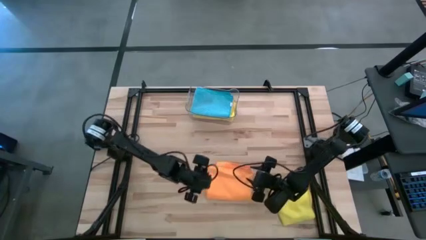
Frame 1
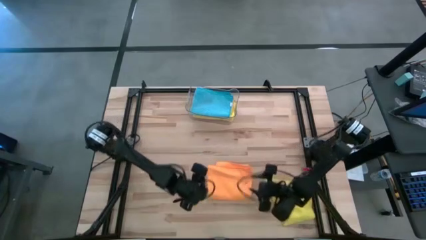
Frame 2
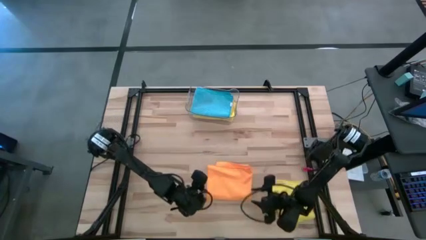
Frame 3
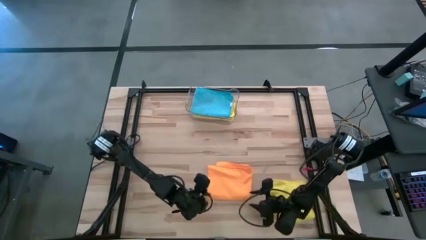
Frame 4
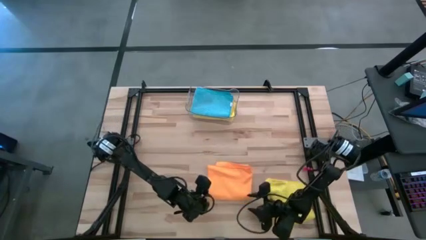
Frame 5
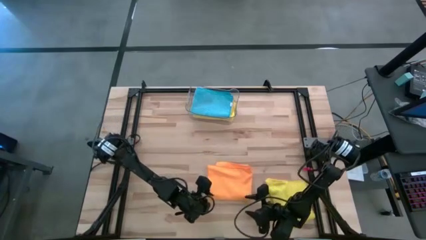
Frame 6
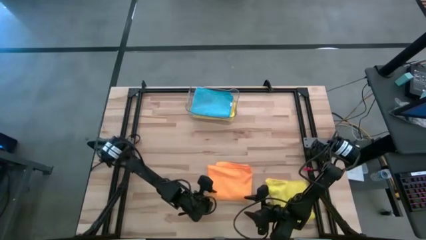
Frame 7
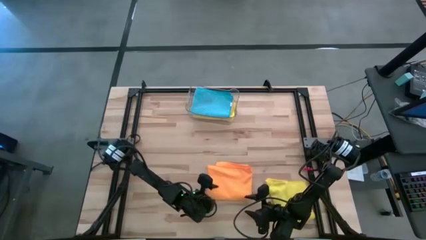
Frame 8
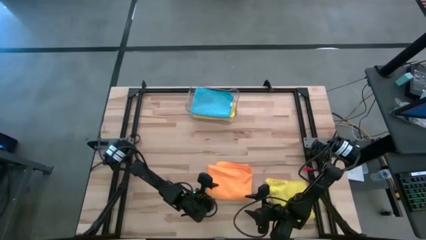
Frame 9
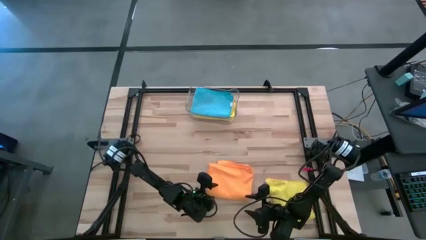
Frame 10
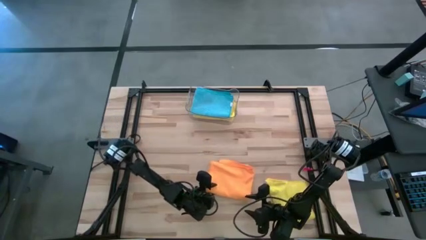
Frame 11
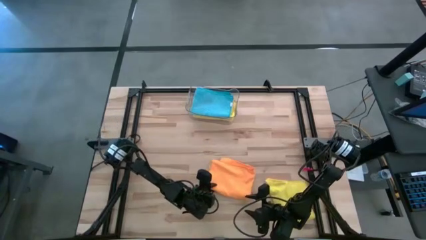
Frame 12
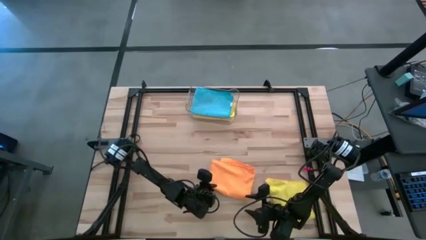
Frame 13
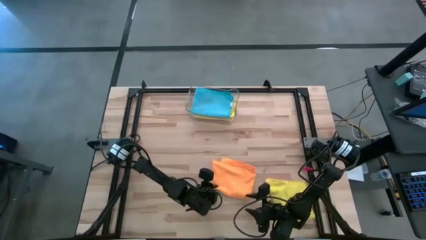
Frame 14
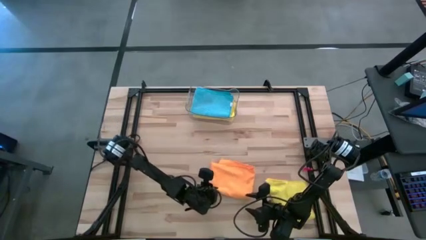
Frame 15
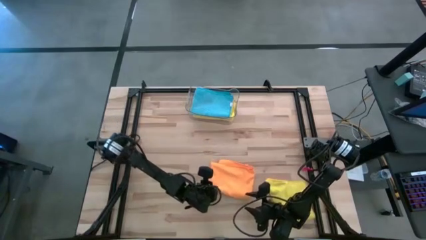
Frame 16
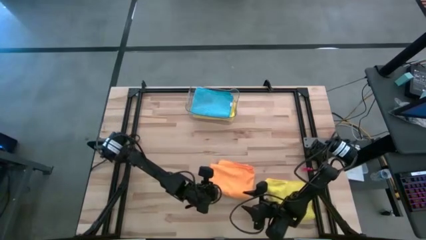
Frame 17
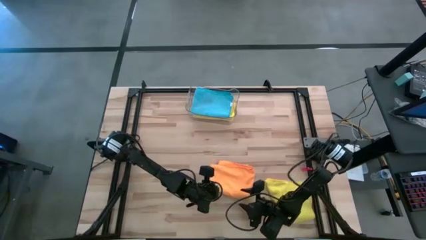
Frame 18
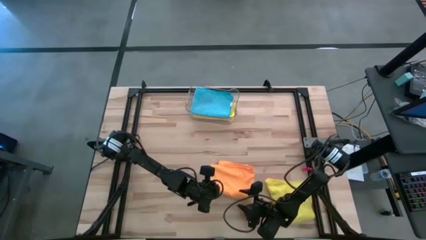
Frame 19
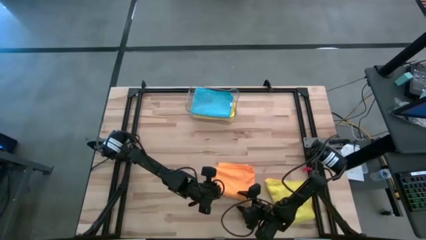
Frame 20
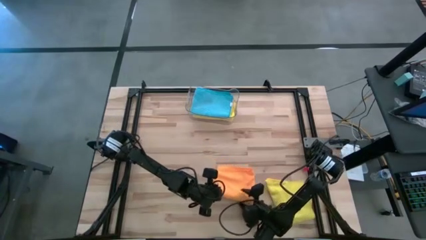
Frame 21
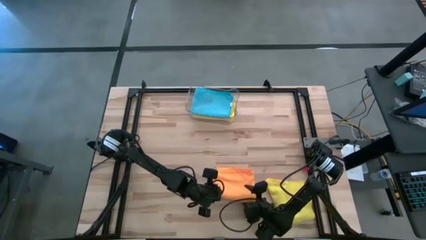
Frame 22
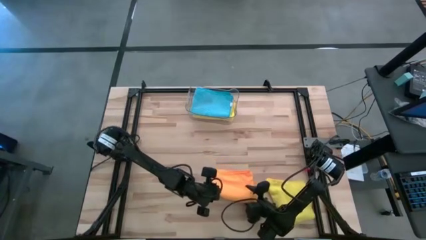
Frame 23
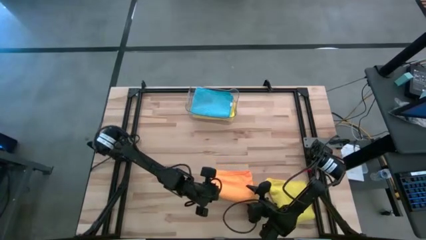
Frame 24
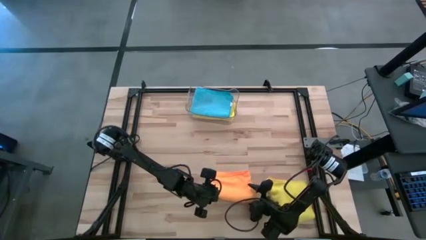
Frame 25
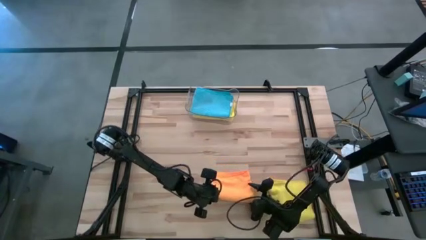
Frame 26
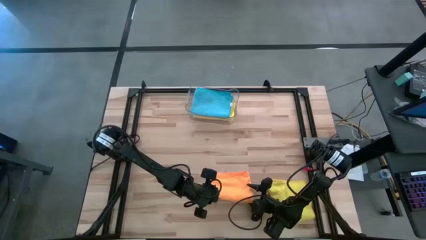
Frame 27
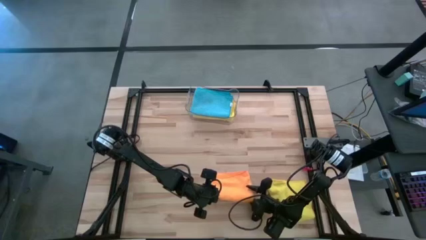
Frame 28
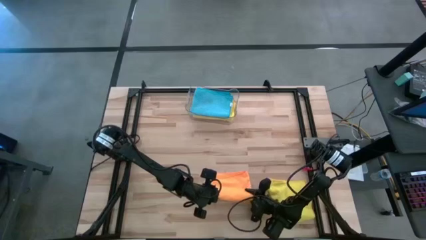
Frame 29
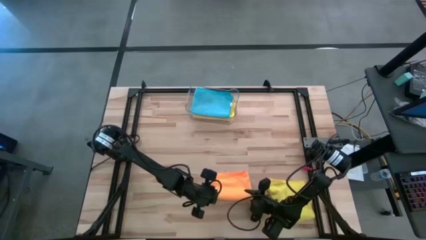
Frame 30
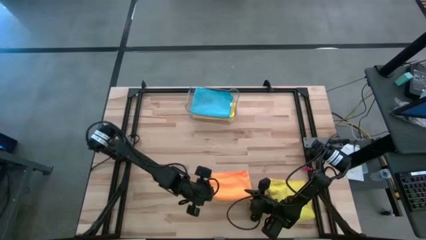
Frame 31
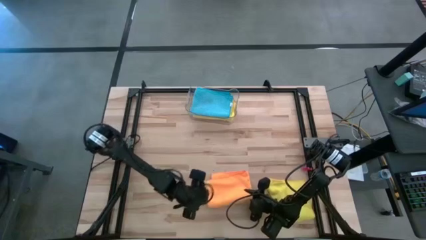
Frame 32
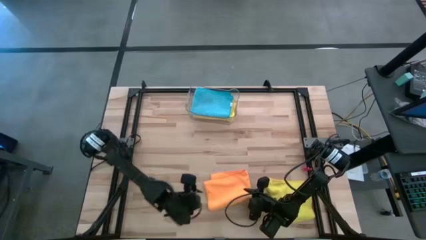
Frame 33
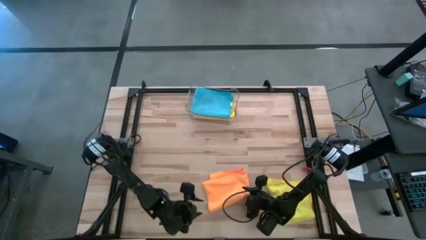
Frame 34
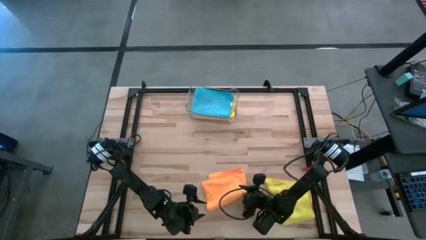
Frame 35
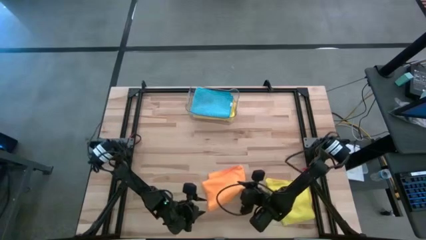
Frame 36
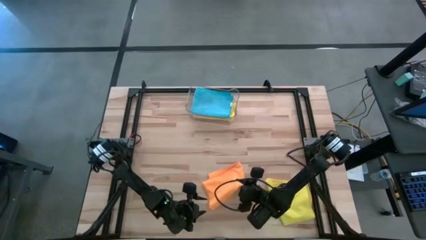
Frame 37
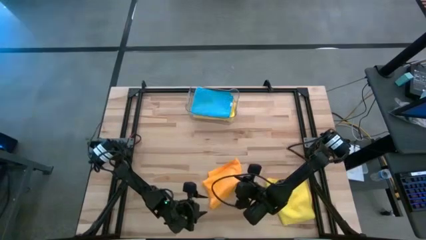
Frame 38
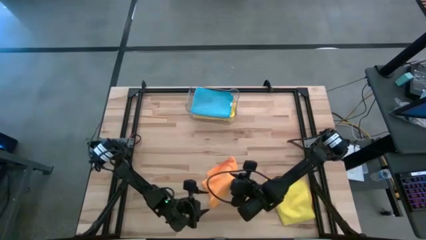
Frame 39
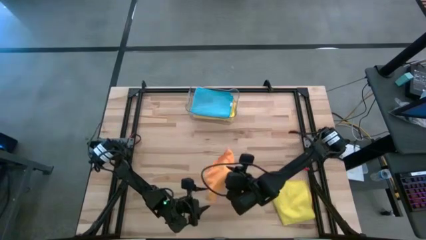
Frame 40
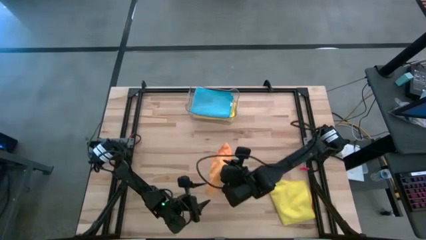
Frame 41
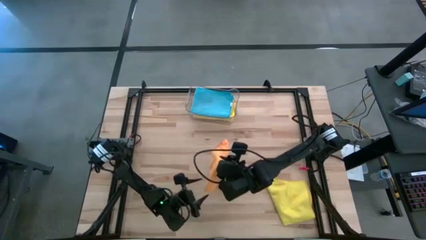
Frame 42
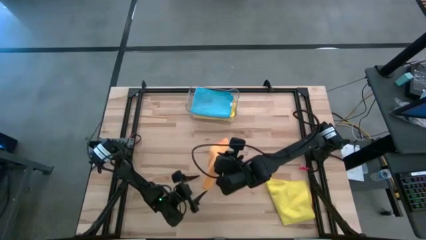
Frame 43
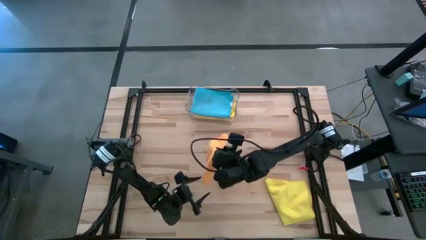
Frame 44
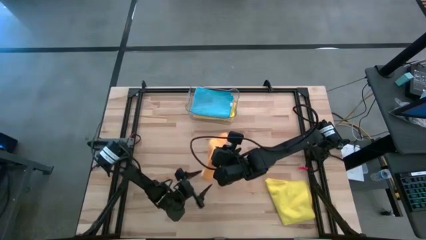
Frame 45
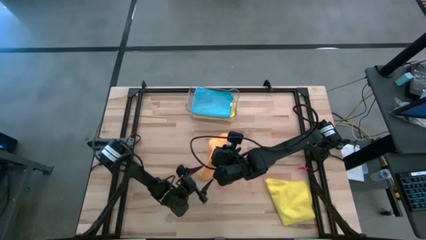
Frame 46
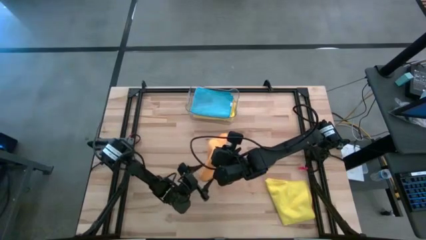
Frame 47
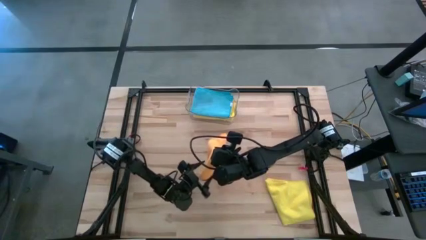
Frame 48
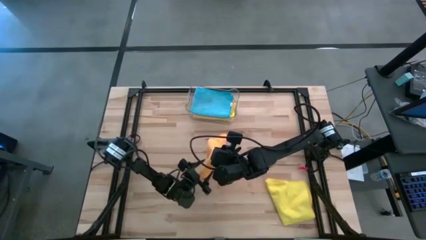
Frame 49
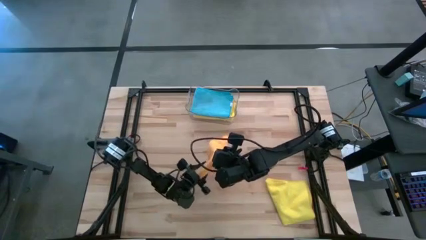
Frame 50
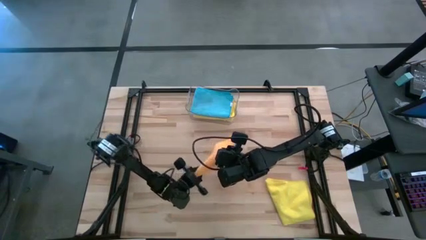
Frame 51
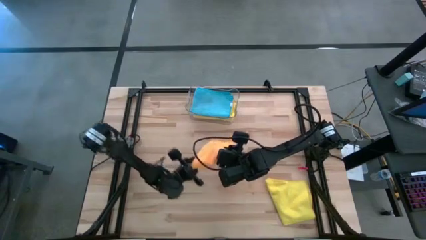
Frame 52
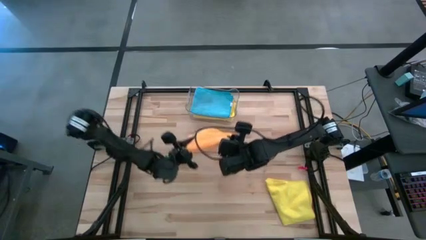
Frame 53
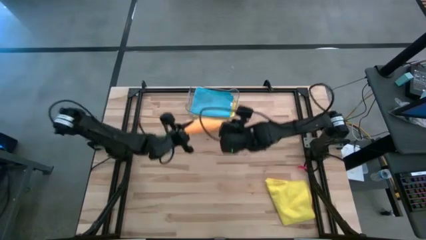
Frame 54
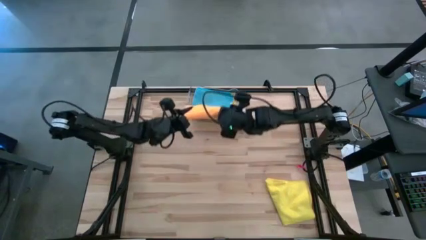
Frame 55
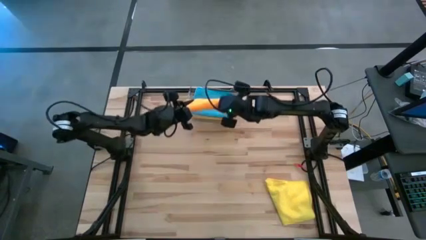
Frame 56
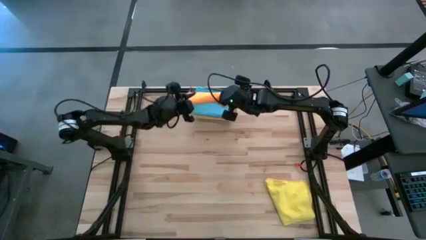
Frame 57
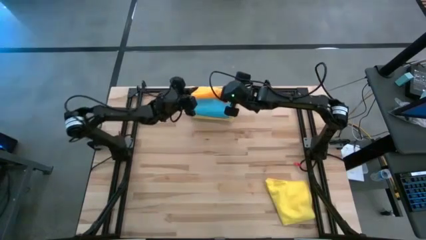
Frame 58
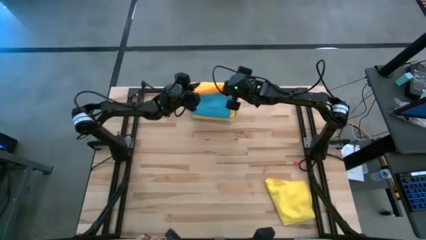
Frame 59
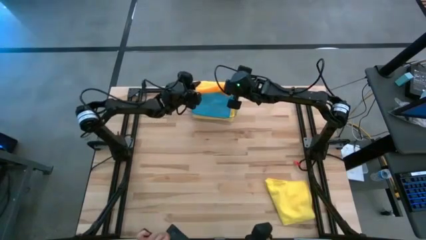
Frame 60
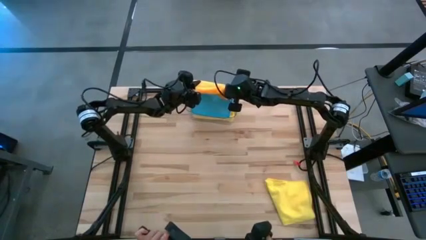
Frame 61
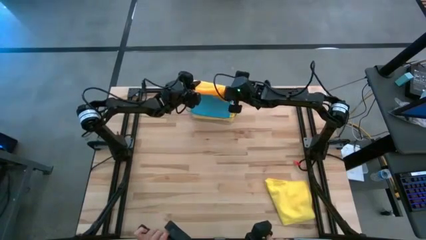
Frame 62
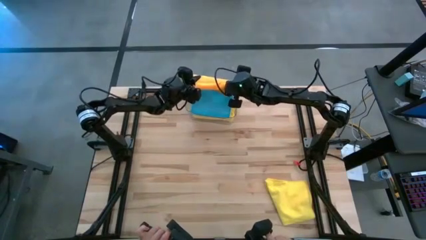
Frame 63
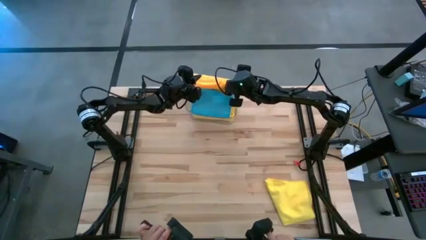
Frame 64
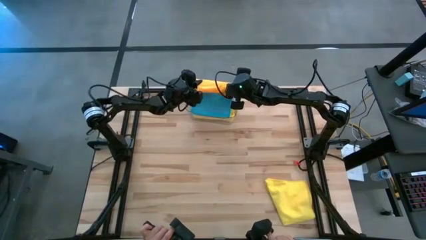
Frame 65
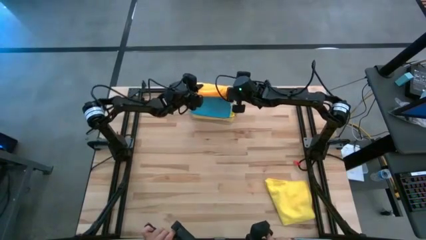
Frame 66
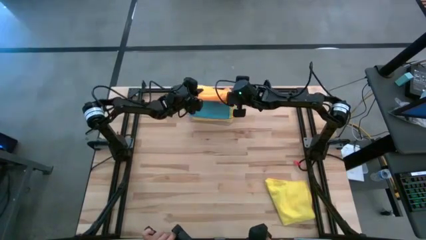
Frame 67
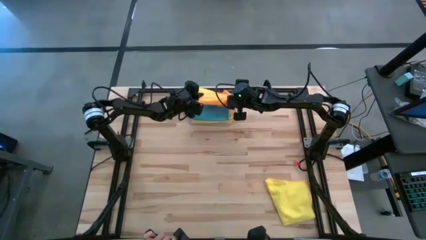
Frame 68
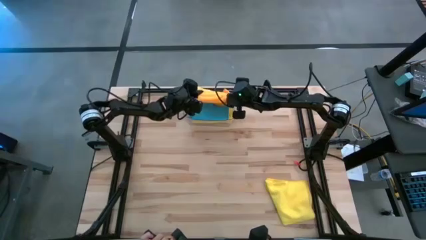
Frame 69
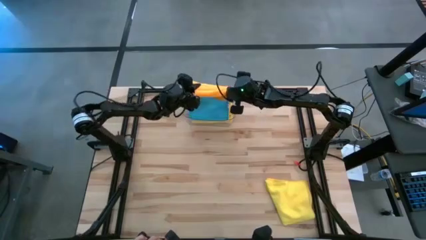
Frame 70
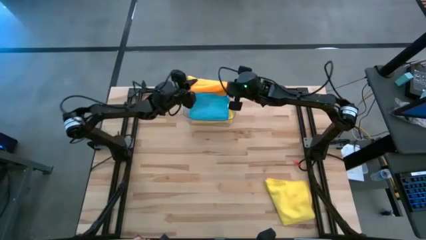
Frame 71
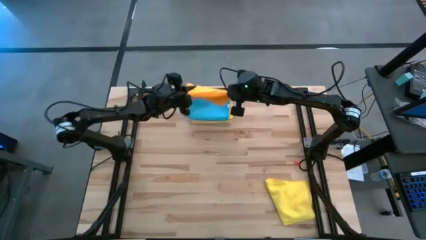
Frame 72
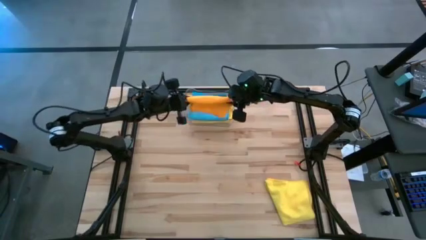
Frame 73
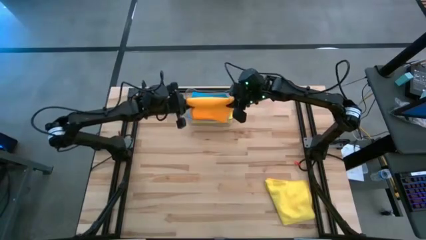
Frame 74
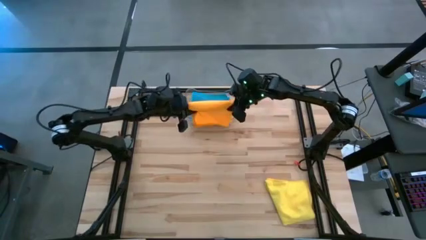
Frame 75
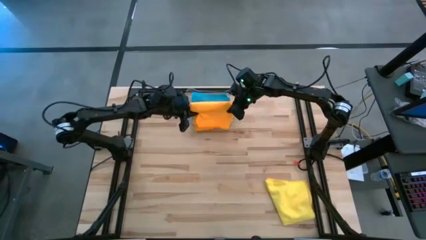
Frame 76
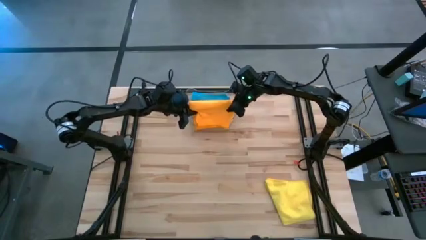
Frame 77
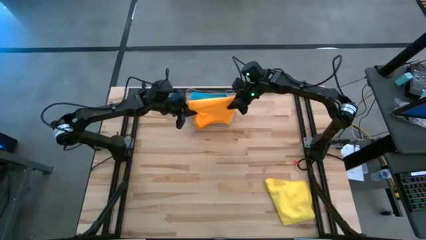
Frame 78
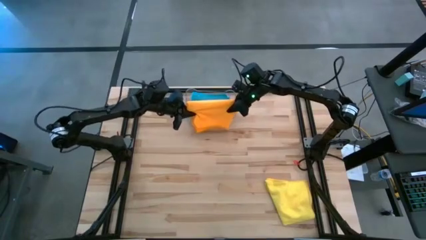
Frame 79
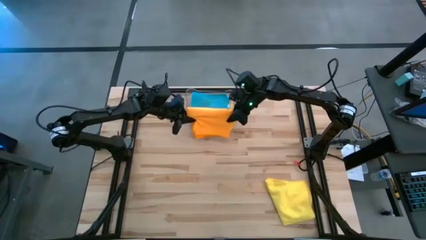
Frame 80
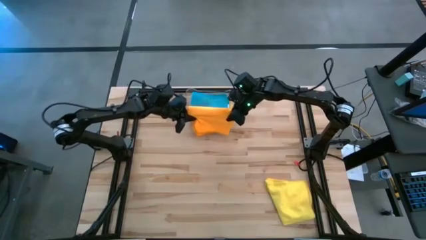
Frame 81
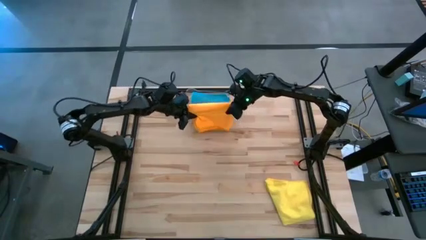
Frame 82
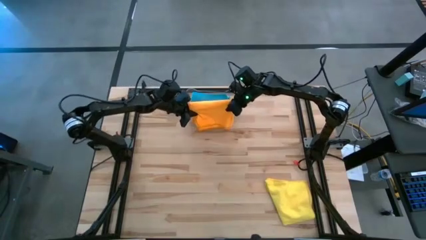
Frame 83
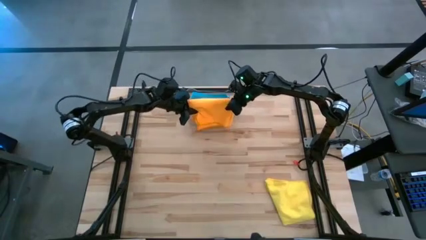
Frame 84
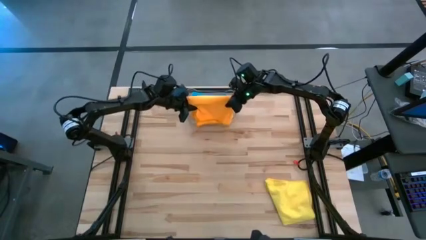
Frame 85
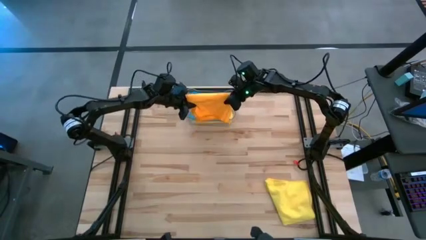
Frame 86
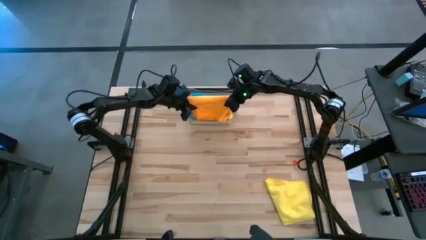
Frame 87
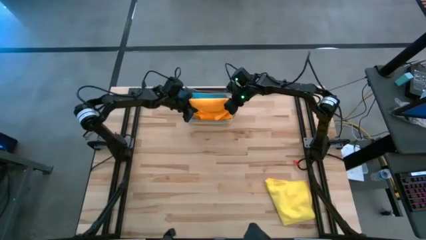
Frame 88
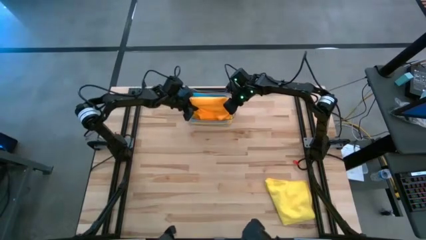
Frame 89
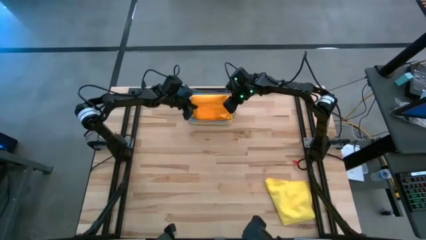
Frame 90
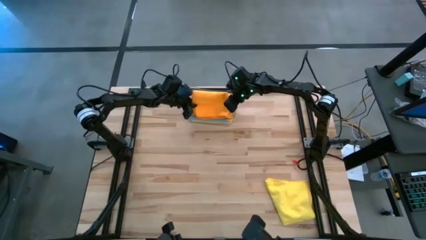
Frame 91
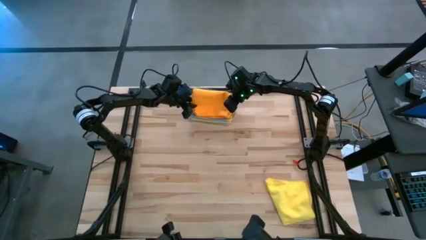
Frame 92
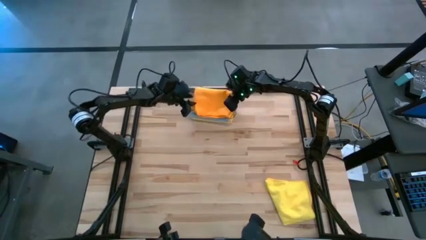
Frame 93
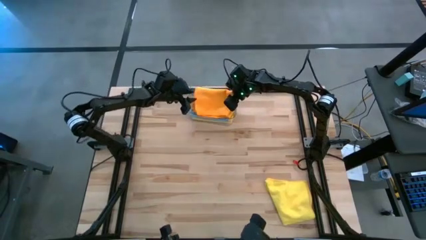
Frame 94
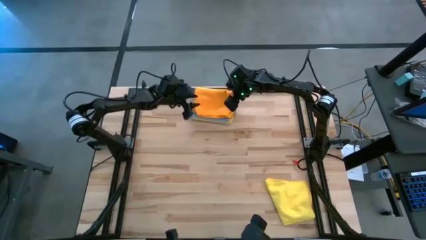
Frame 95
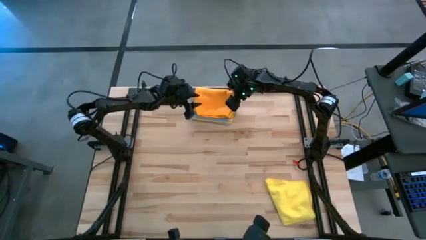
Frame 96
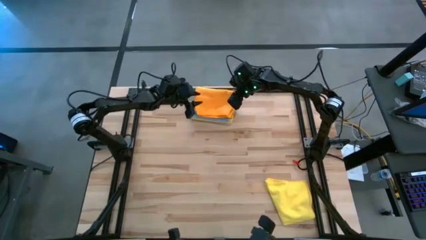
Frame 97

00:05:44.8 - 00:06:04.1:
Task: Fold microfiber towels
Put the orange microfiber cloth into the transparent bin
